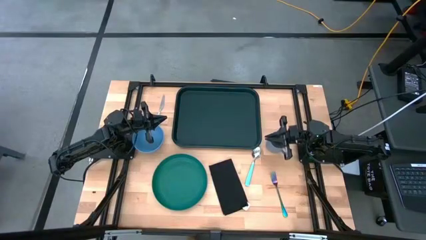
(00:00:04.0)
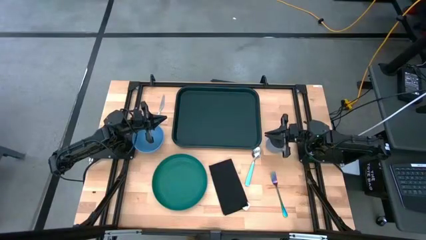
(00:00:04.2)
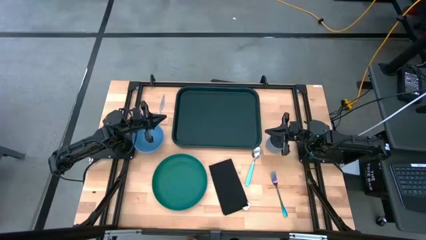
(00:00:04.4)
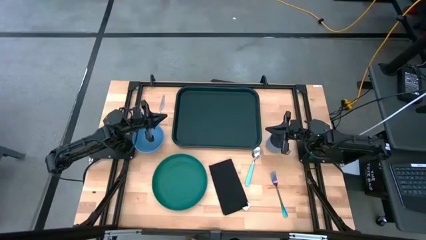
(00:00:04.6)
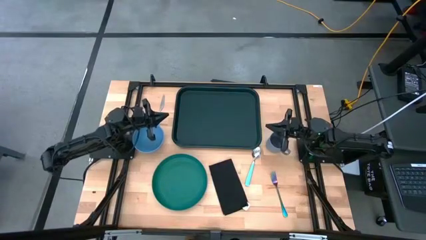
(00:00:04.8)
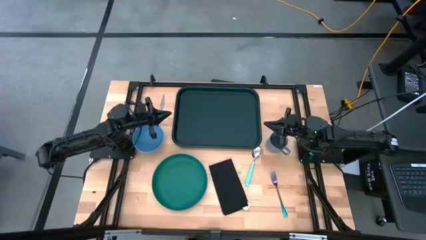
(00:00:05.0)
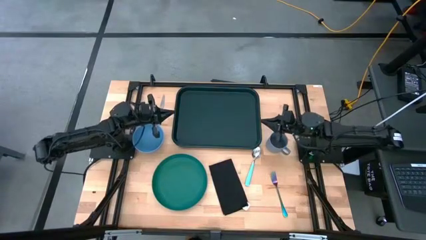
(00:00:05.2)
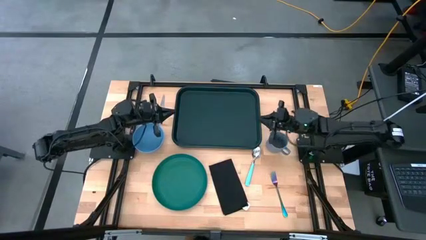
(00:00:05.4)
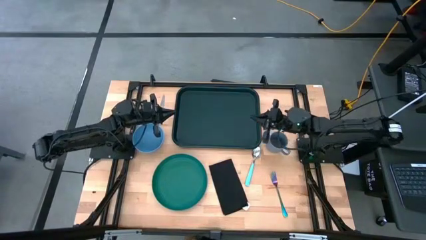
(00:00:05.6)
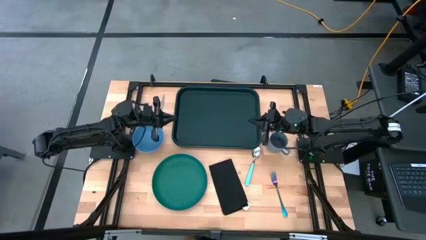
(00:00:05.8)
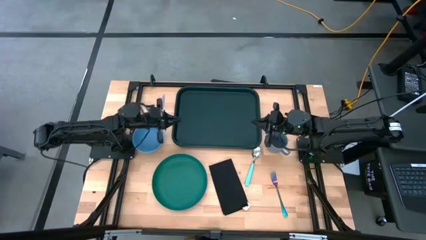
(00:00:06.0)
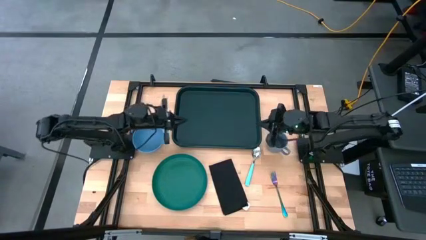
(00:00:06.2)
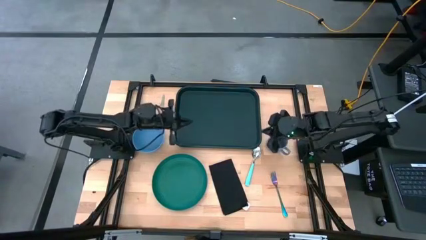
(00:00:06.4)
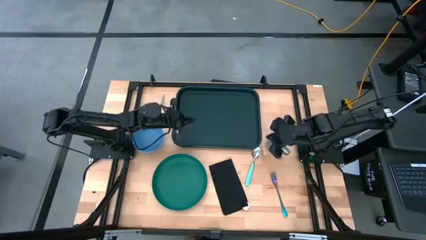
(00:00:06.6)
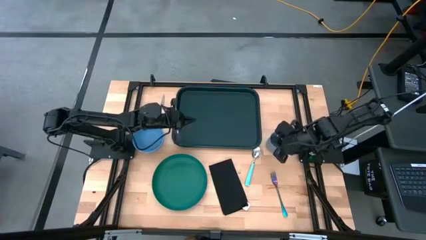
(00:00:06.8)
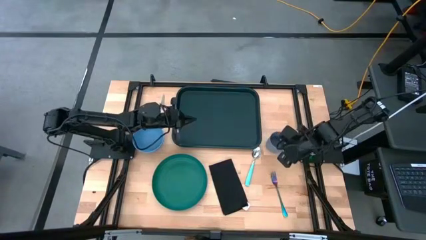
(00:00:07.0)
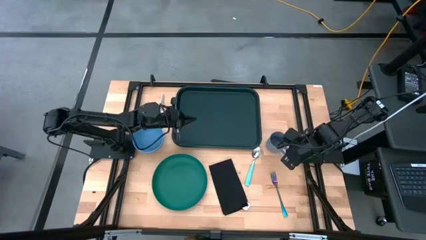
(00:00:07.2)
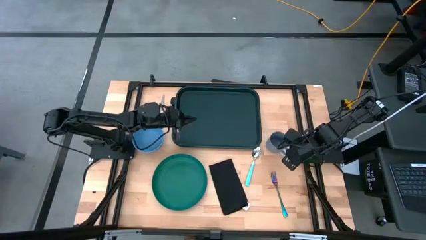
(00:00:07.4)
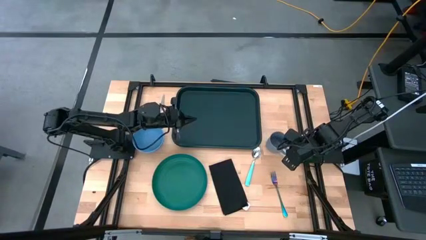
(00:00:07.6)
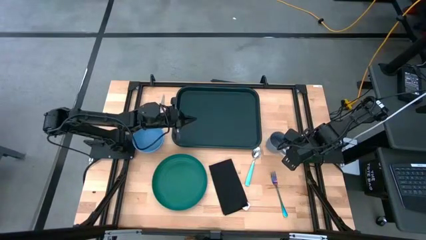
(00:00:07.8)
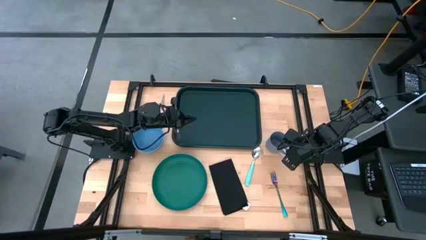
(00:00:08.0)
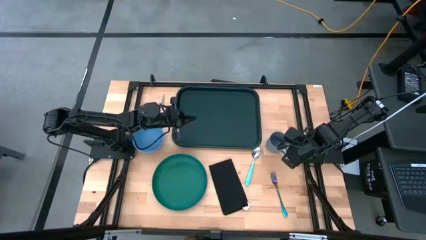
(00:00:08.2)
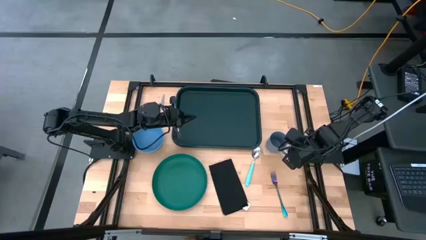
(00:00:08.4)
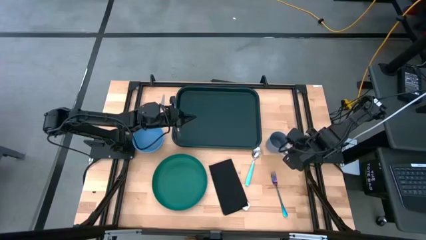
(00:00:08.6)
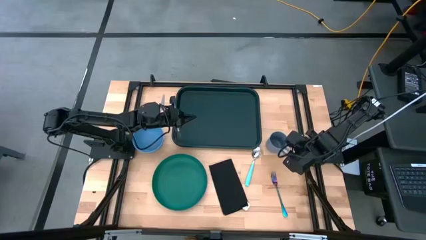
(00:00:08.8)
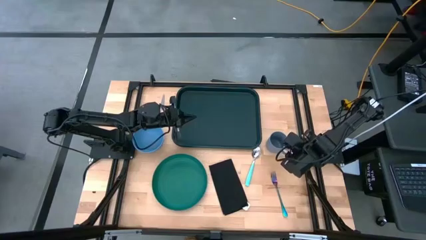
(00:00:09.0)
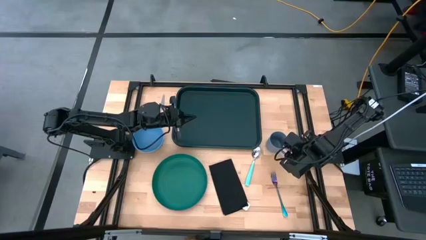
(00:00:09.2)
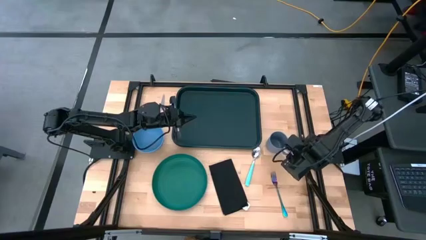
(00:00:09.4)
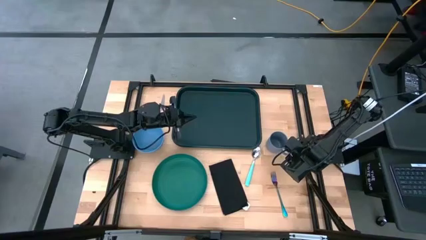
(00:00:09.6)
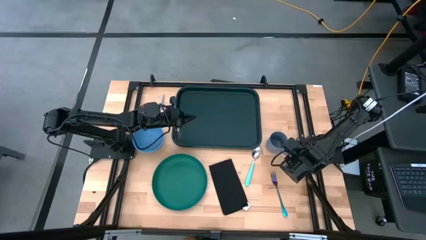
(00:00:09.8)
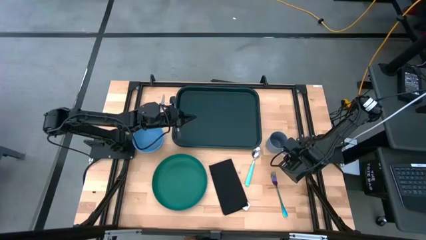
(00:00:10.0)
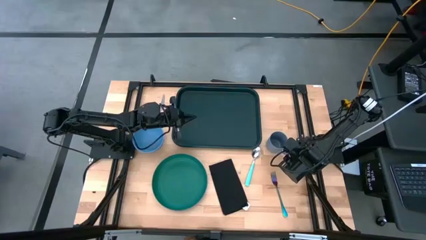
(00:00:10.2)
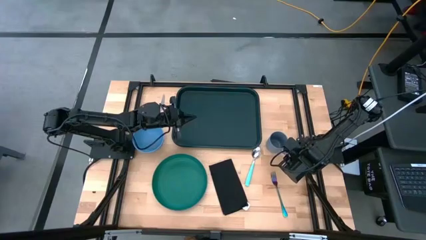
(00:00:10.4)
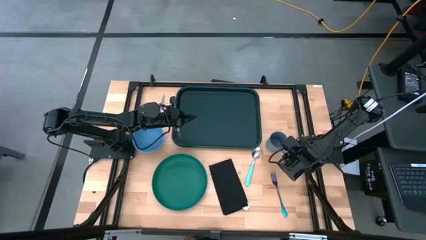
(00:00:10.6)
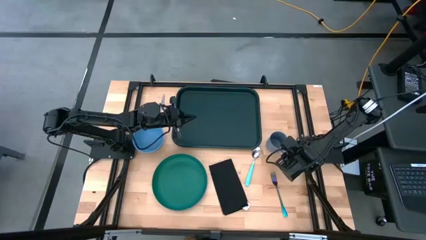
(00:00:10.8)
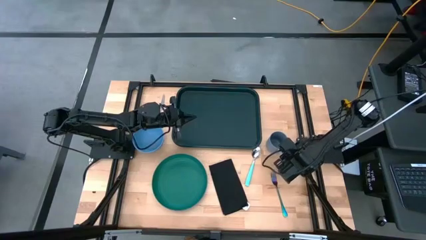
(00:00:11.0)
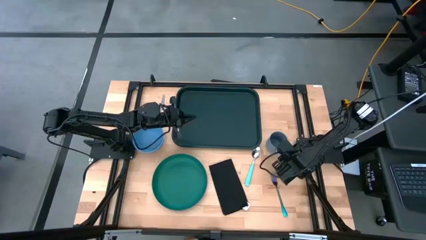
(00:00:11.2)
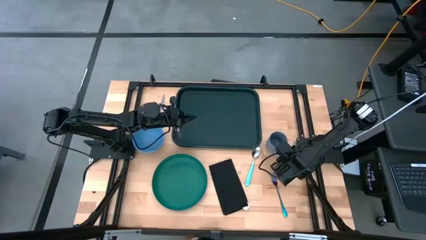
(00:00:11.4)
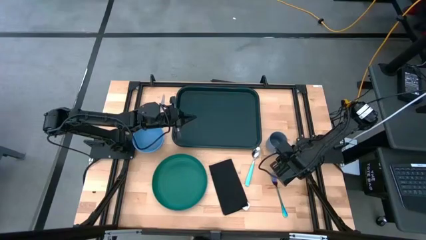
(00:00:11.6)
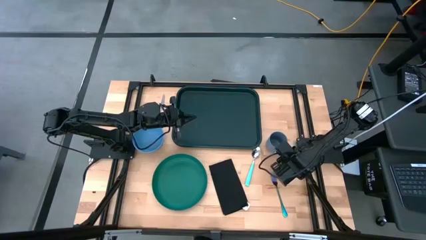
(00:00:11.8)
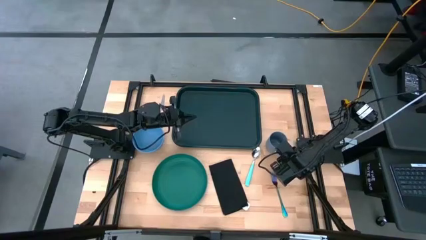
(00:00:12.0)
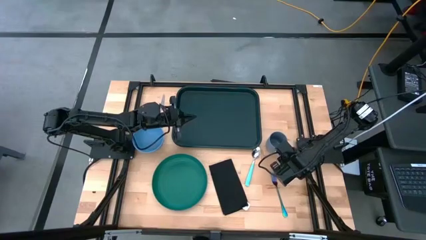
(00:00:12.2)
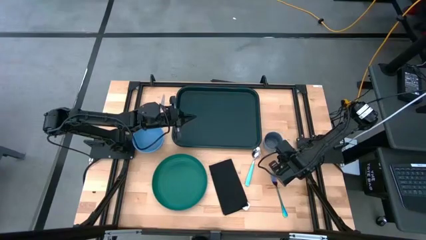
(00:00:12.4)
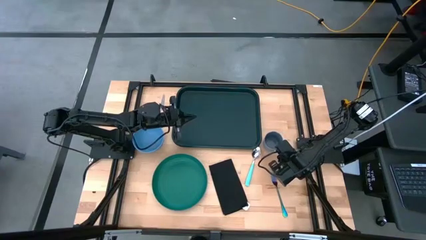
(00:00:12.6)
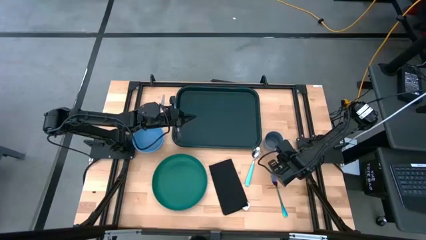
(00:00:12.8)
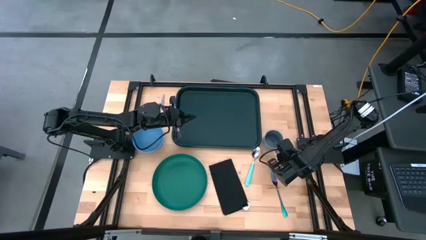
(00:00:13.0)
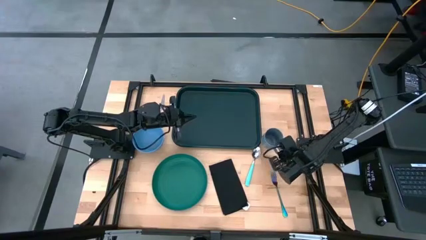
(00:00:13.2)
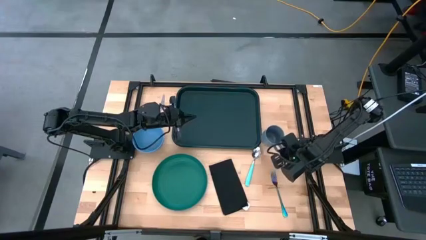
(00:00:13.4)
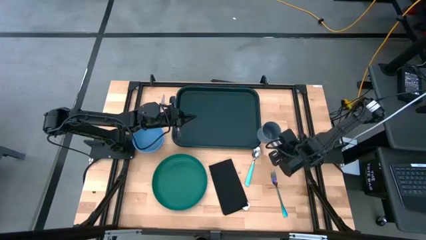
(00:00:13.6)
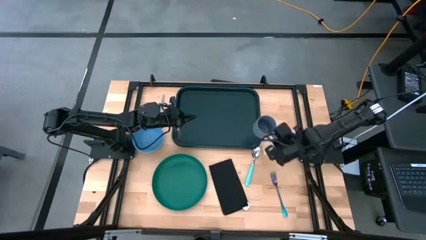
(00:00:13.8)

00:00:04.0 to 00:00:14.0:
Task: Set up tray
Put the gray cup on the black tray
